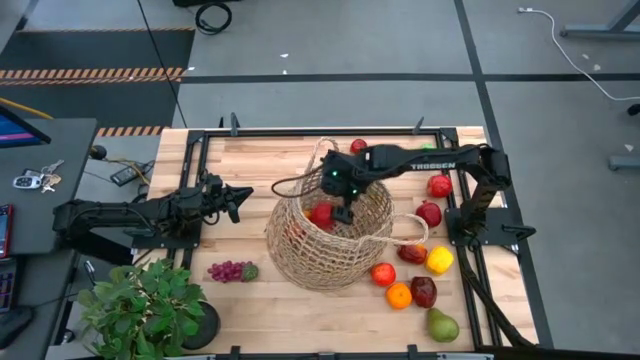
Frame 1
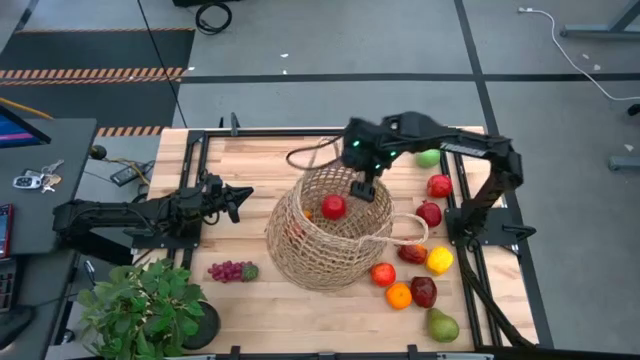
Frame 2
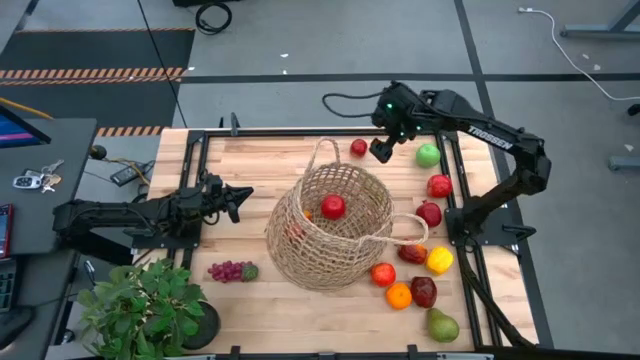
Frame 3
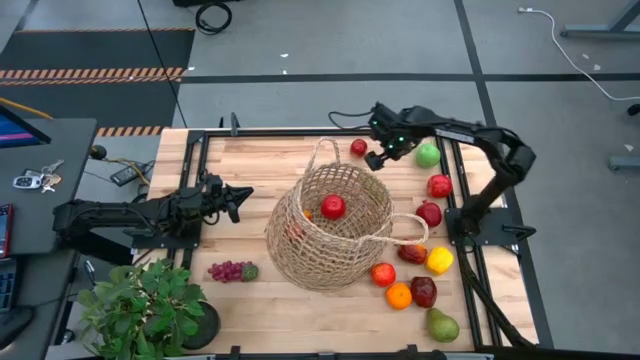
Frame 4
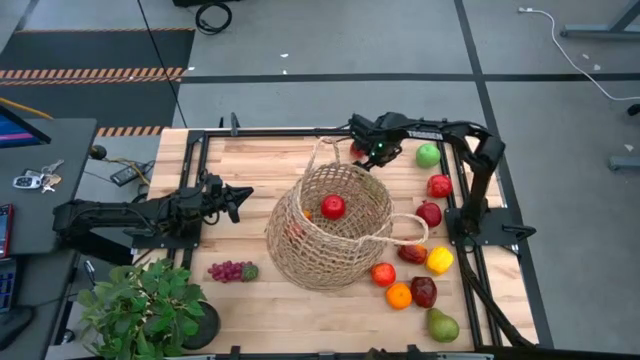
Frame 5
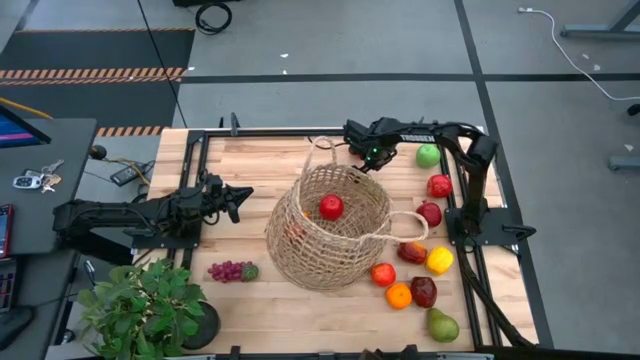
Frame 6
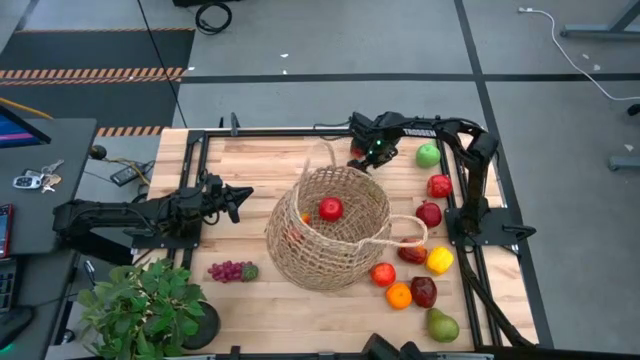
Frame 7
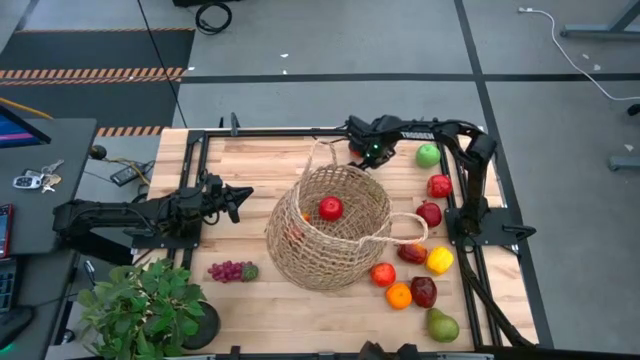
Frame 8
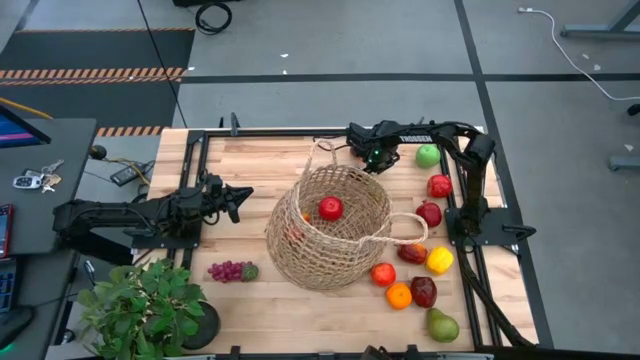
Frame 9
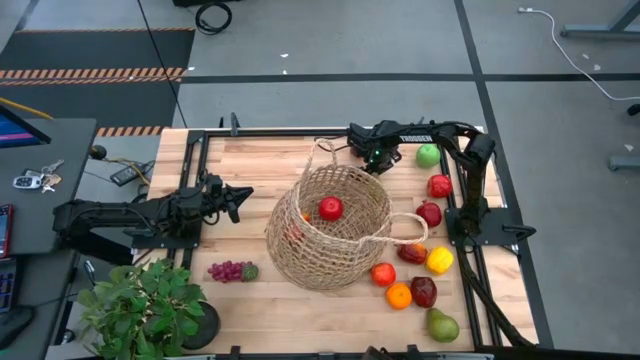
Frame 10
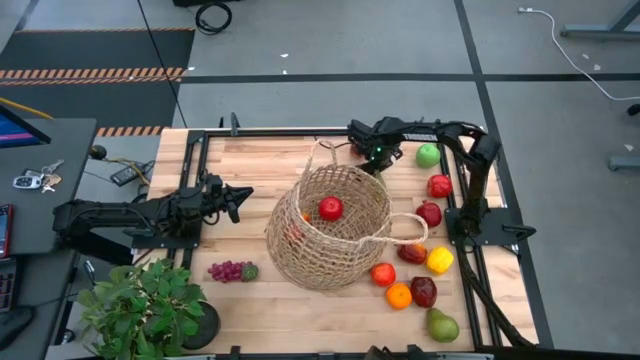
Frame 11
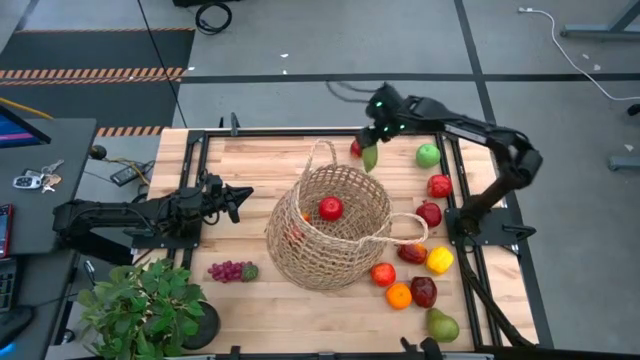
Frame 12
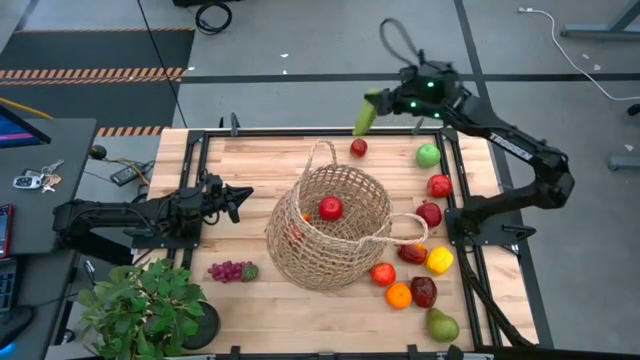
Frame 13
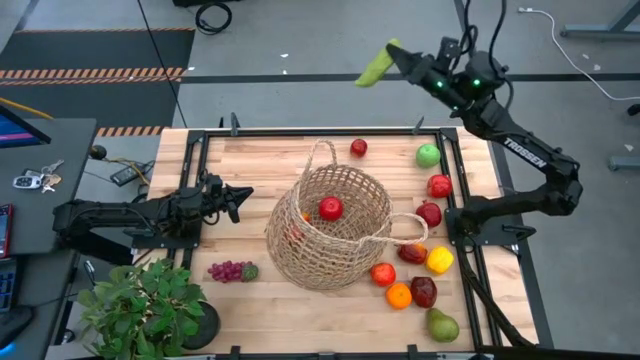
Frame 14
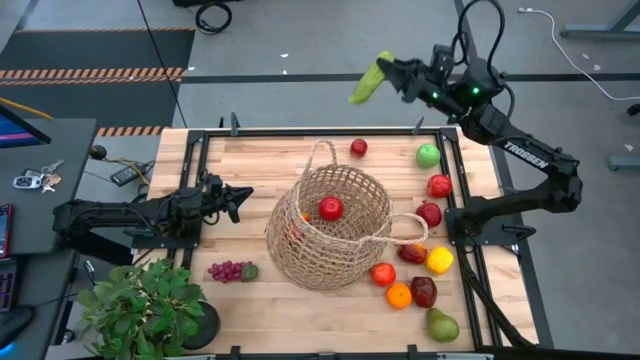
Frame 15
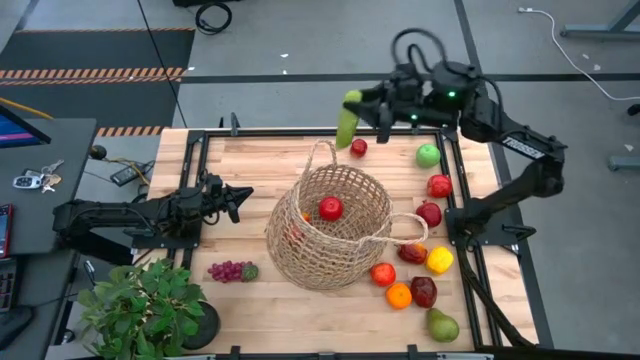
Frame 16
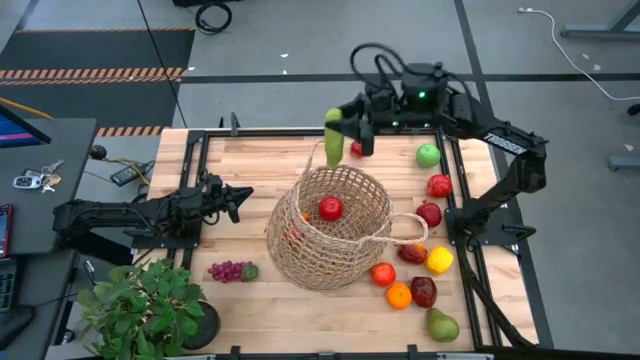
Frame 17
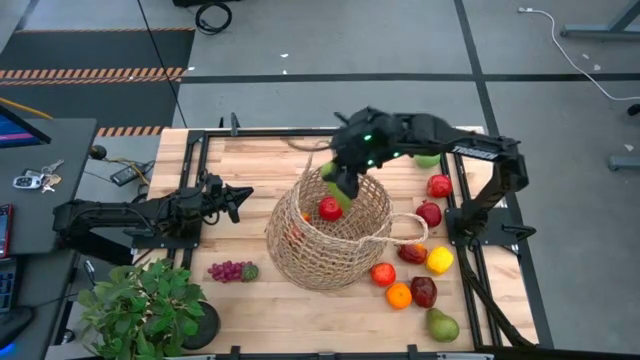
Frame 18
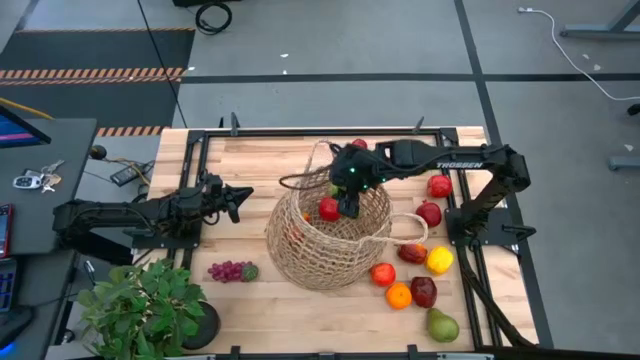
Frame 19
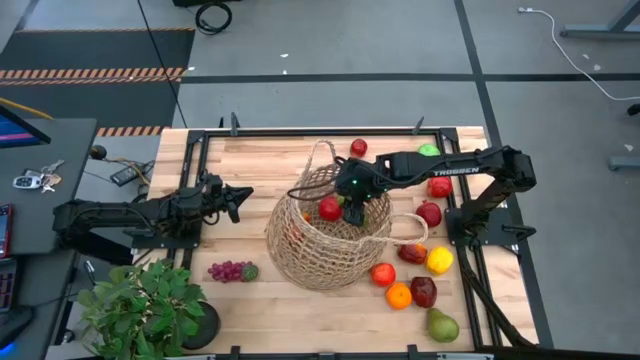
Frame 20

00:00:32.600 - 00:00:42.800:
Task: Build produce basket
Put the cucumber into the brown basket

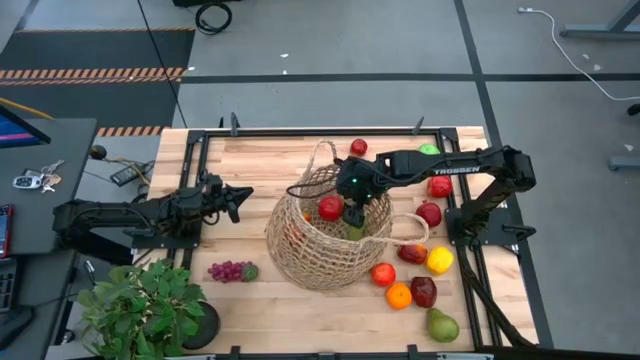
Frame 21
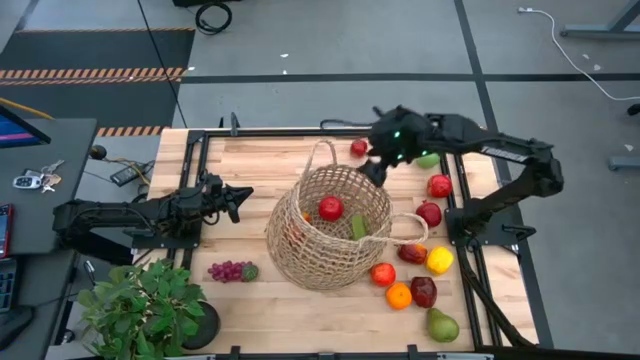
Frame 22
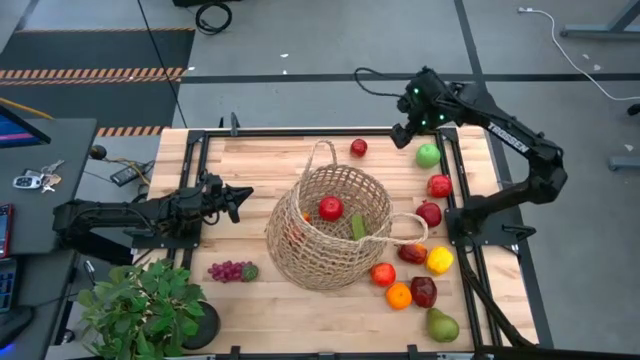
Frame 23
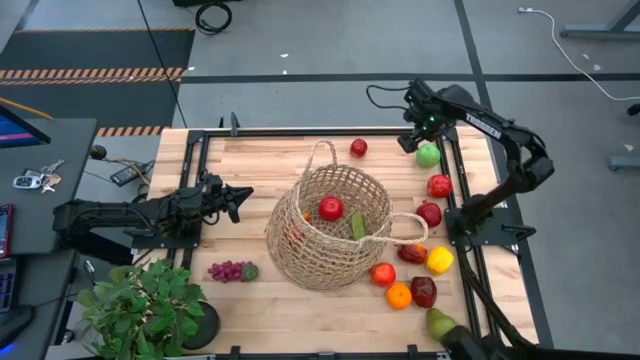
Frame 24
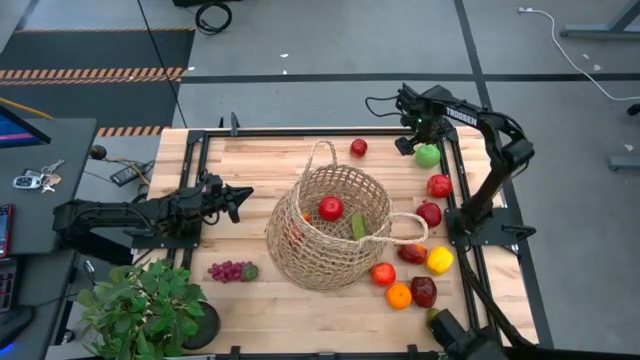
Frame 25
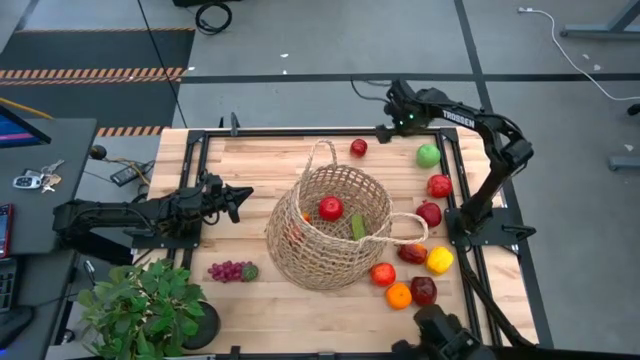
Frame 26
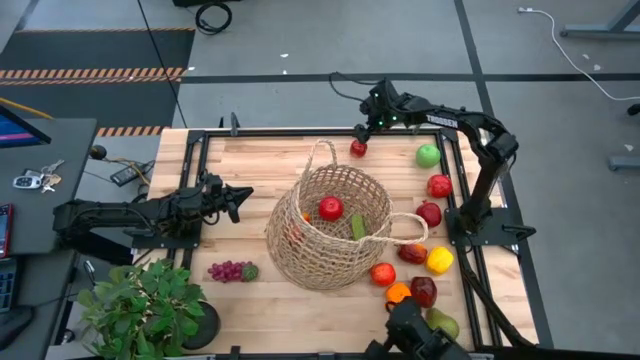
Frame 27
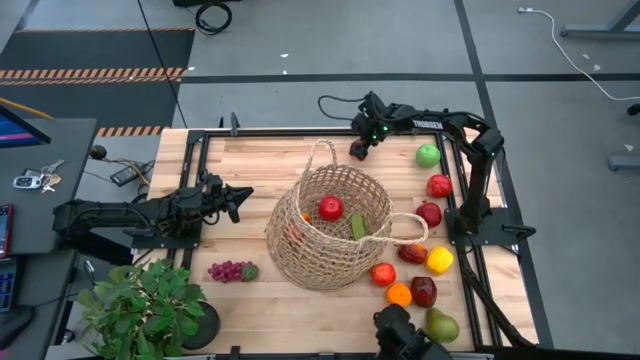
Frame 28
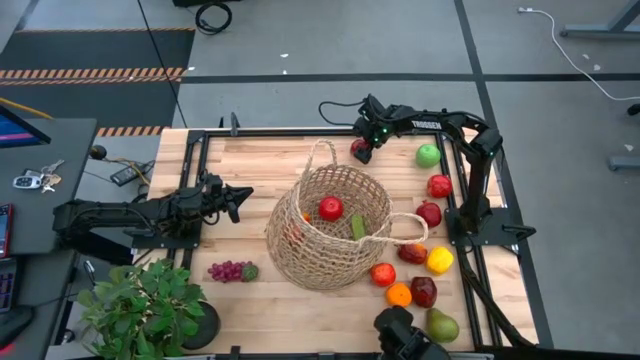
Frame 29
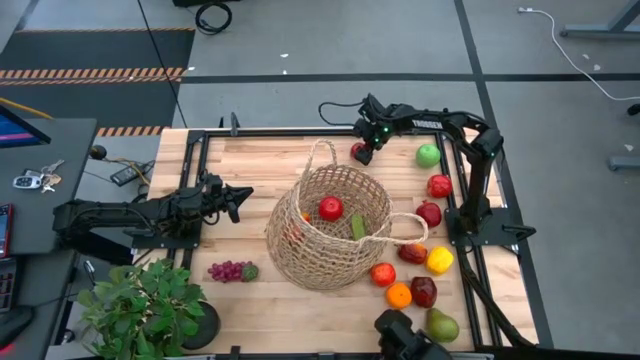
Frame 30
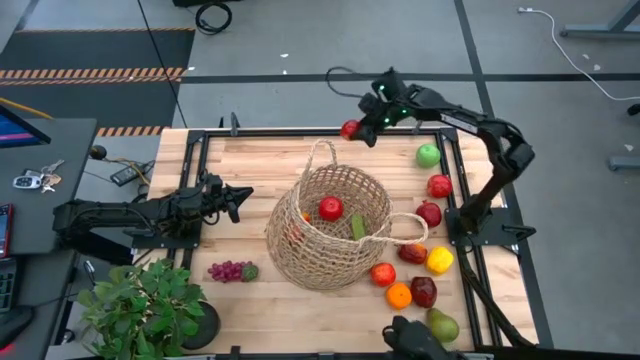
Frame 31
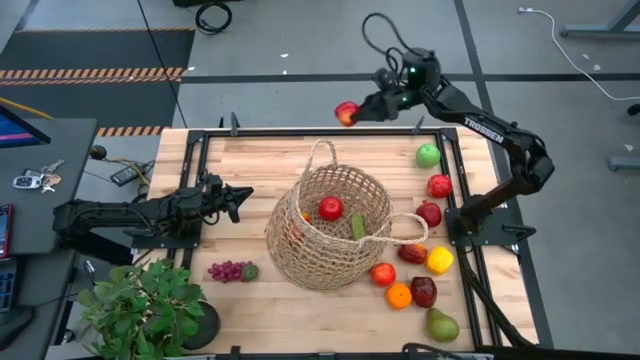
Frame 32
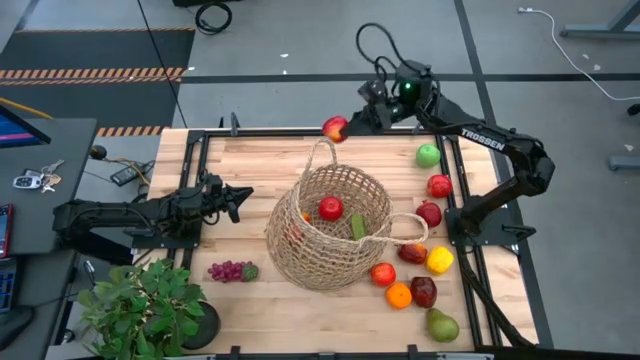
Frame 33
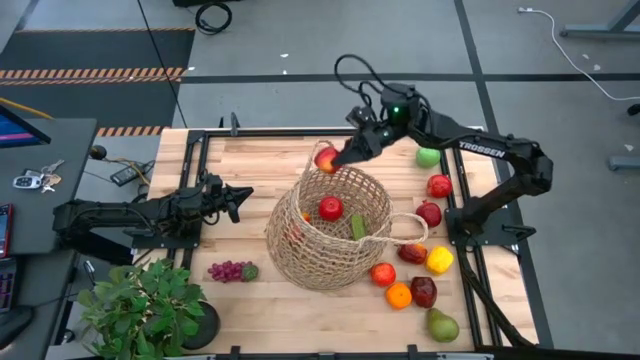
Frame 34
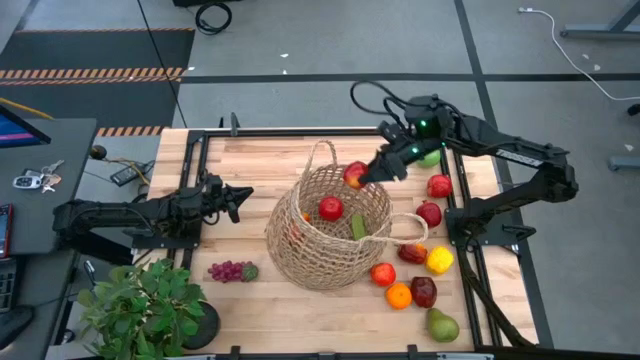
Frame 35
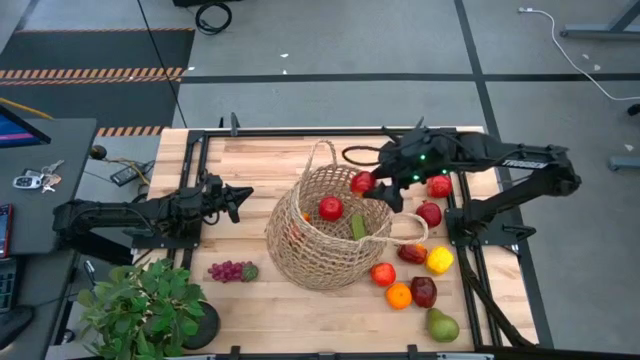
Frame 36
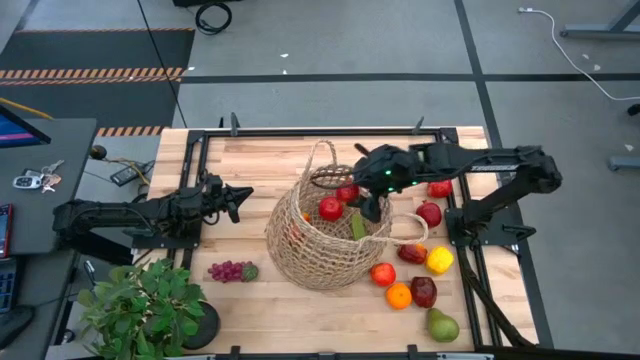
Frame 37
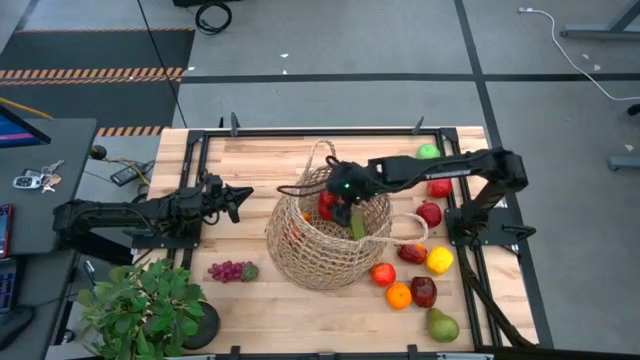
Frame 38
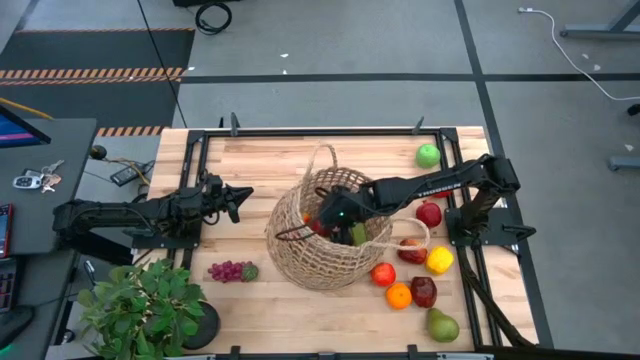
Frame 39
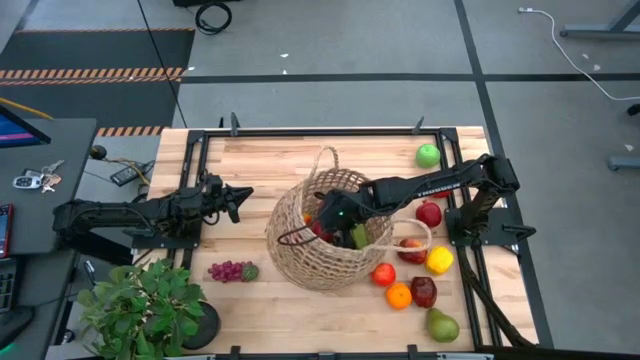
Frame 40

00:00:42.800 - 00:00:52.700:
Put the red apple into the brown basket

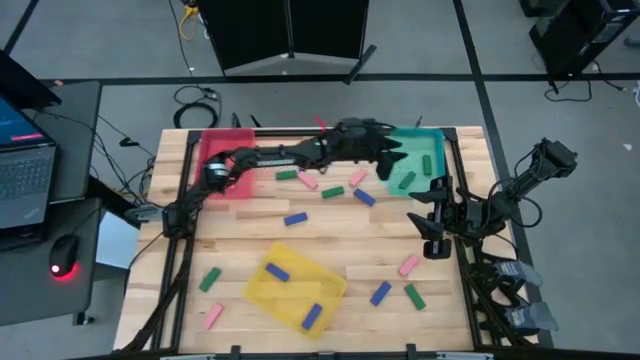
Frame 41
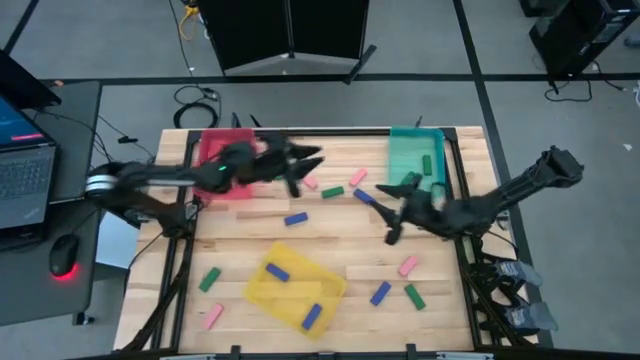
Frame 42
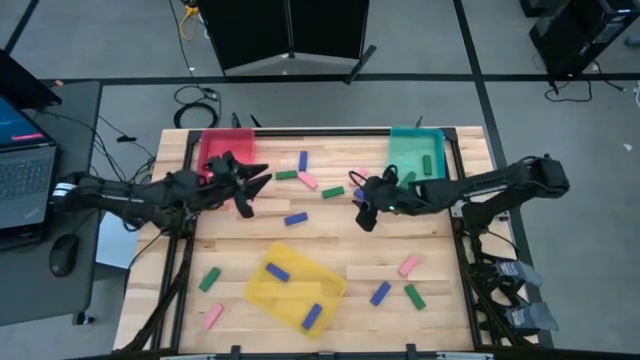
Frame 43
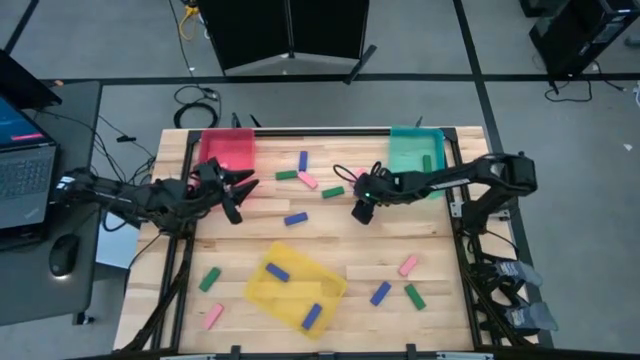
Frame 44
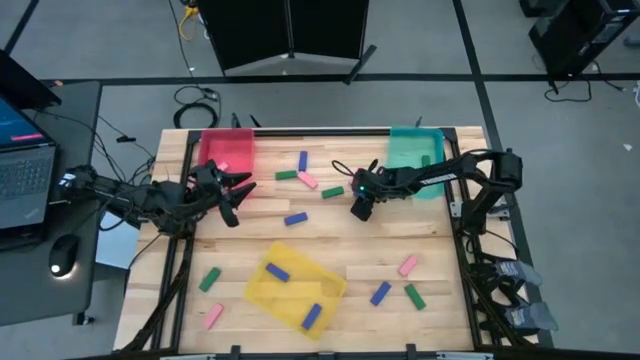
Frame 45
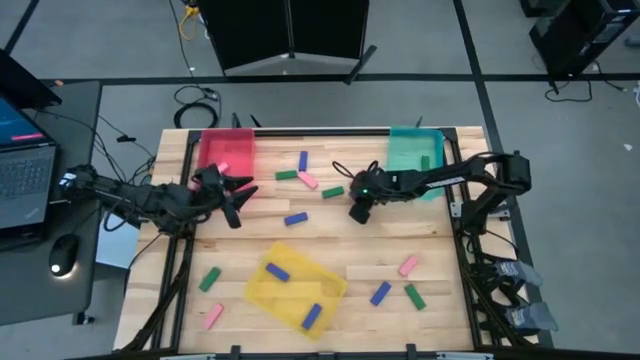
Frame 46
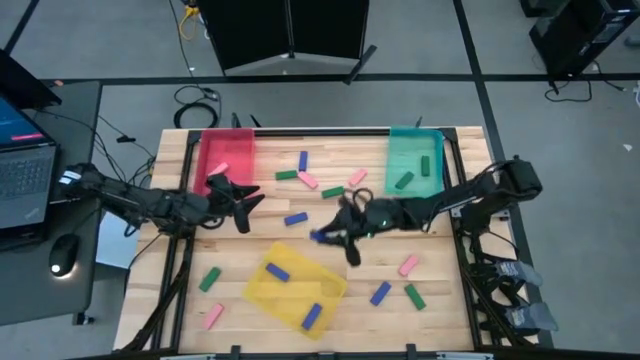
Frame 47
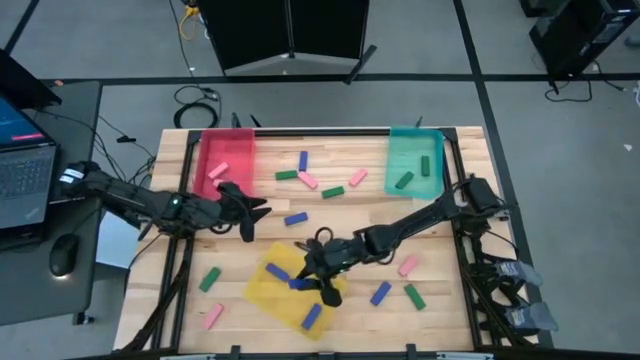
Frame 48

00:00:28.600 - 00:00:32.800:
Task: Sort blocks
Put the blue block into the yellow bin
